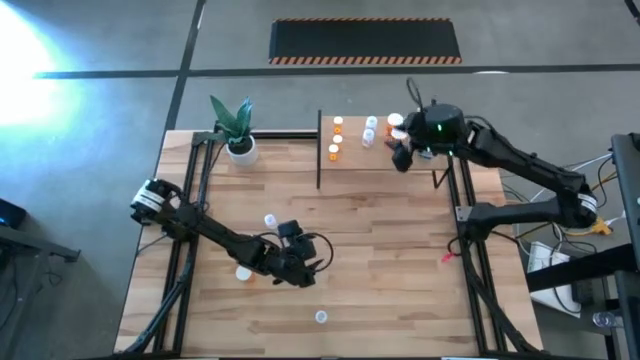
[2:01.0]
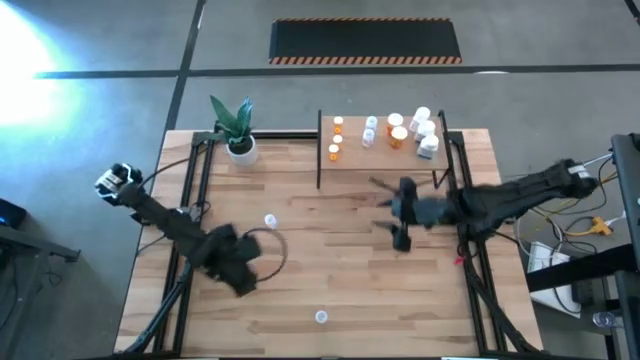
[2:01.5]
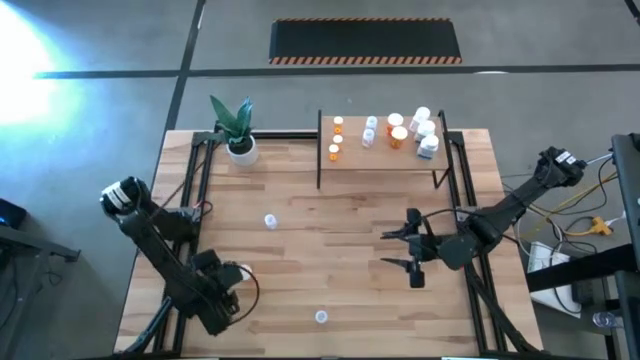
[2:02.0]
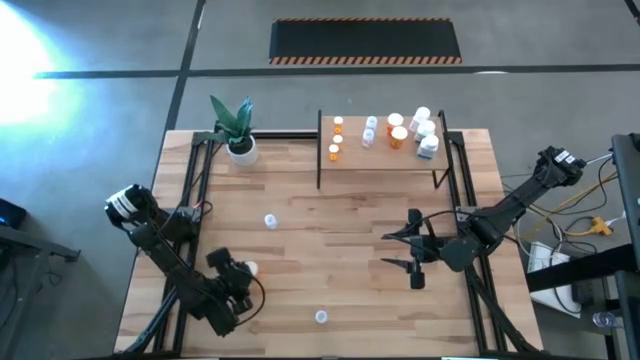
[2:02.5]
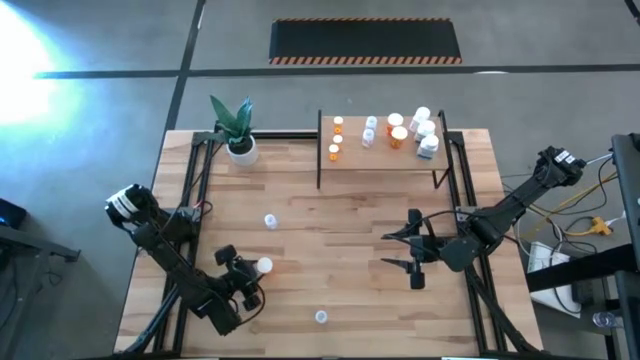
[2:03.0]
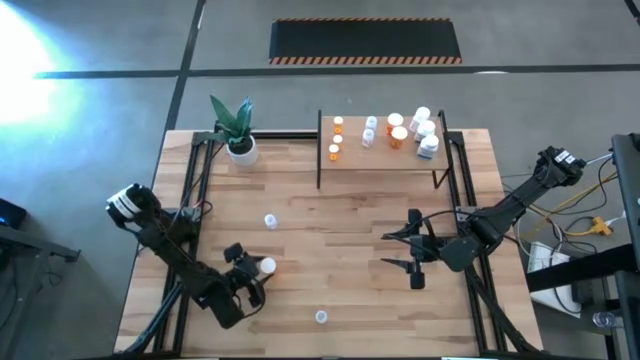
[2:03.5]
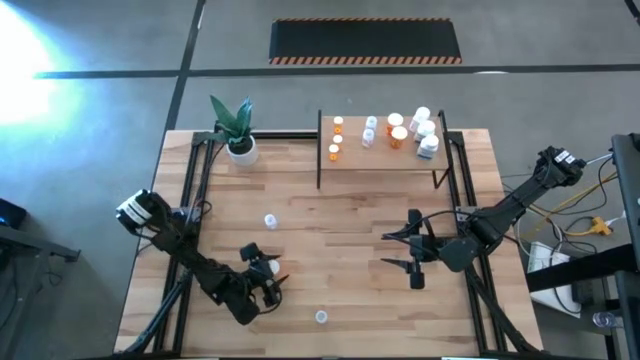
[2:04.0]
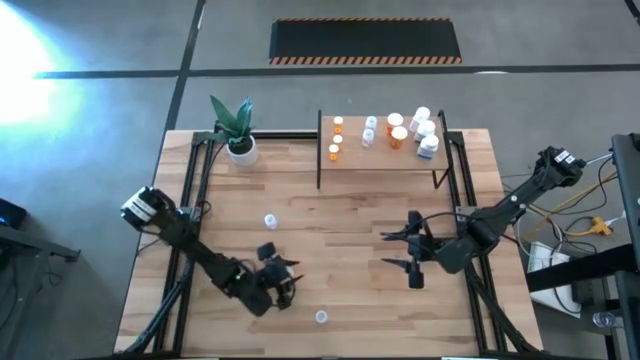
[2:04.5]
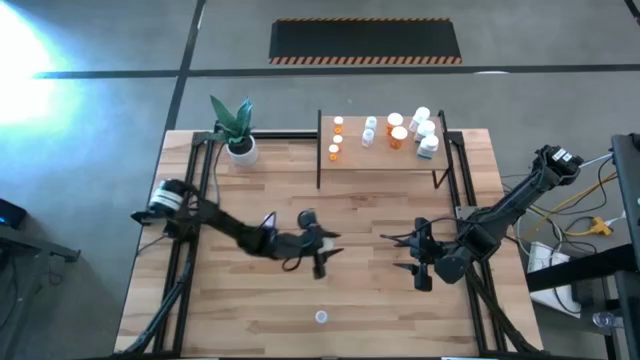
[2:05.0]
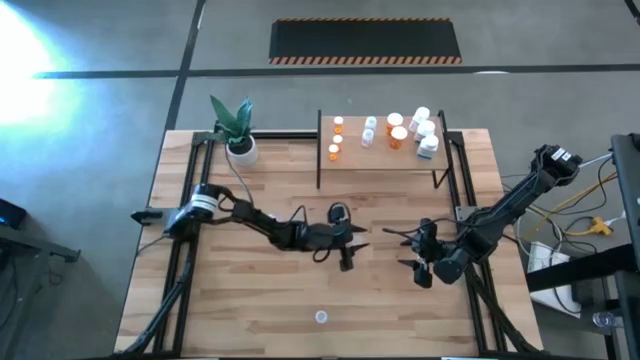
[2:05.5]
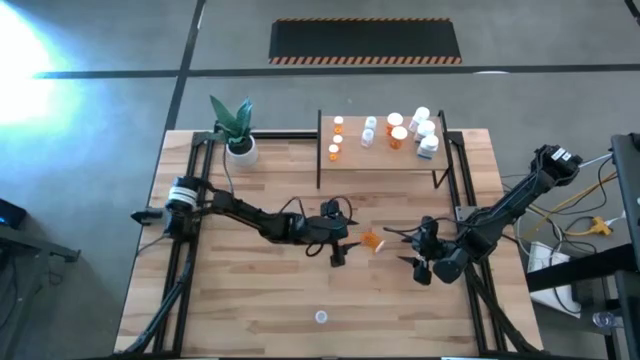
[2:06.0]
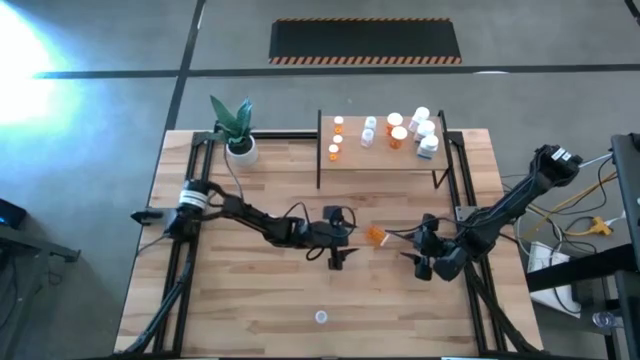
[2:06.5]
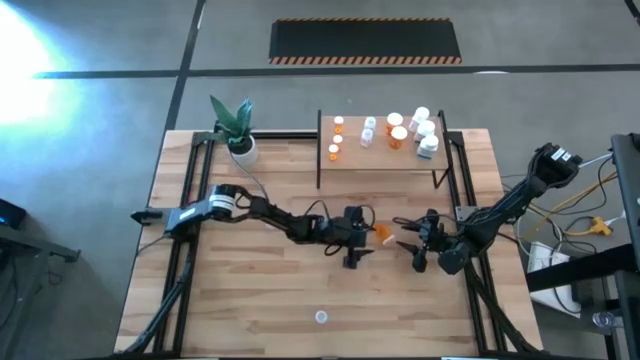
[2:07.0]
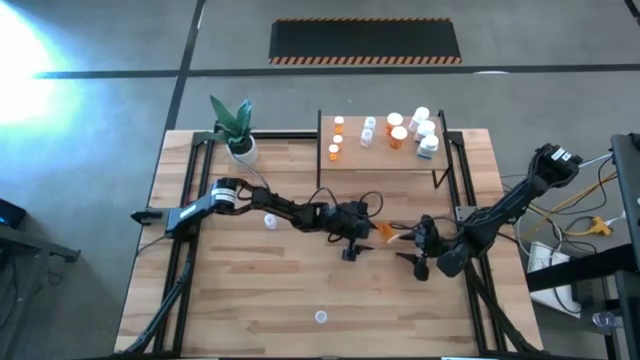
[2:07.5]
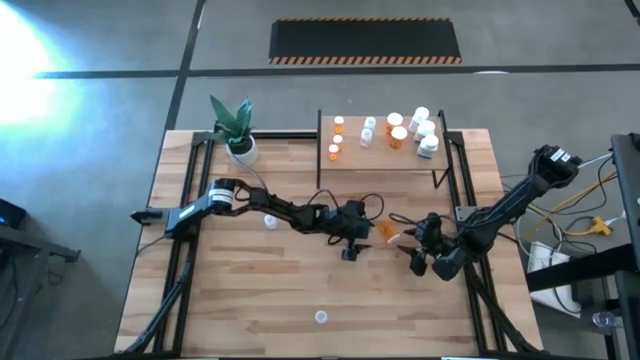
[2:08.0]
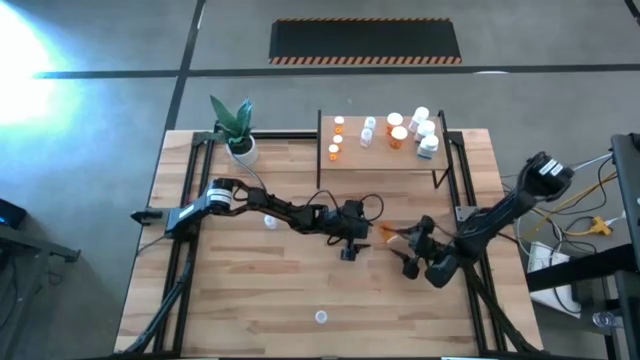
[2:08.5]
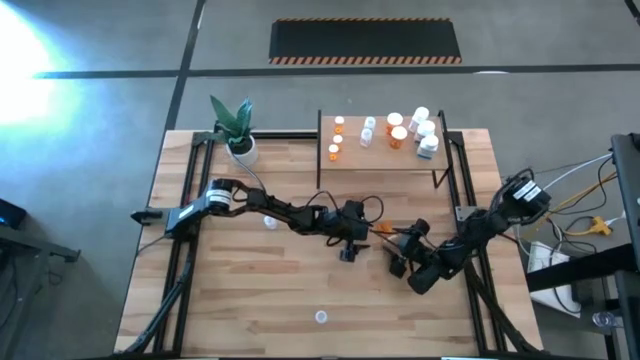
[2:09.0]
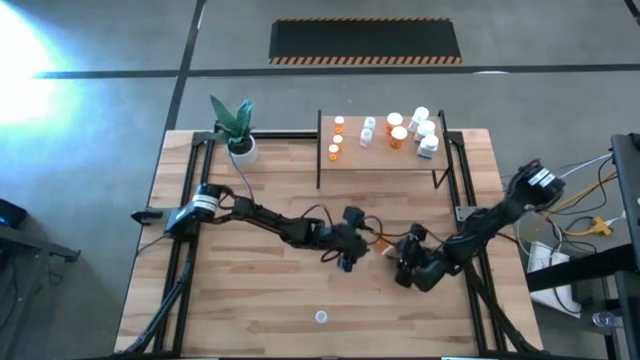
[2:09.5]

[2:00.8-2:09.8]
Task: Pick and place medicine bottles onto shelf by color
Put the big orange pill bottle on the shelf aligned with the other big orange pill bottles

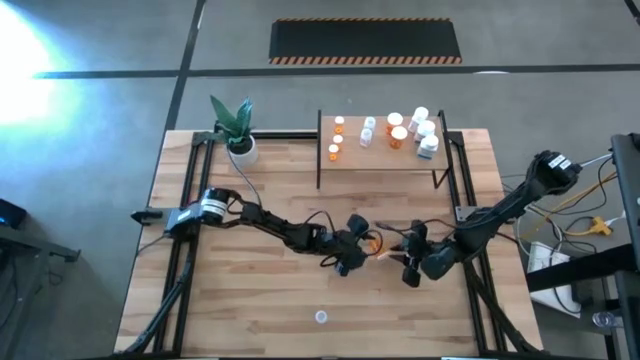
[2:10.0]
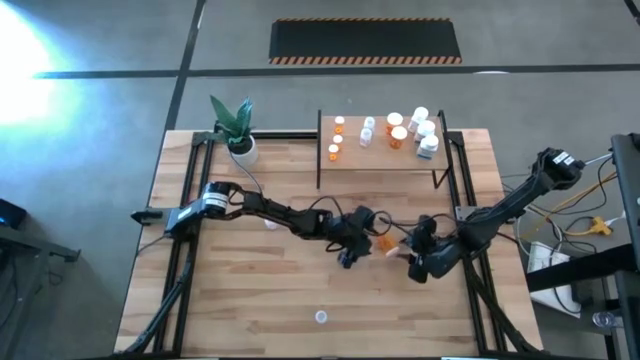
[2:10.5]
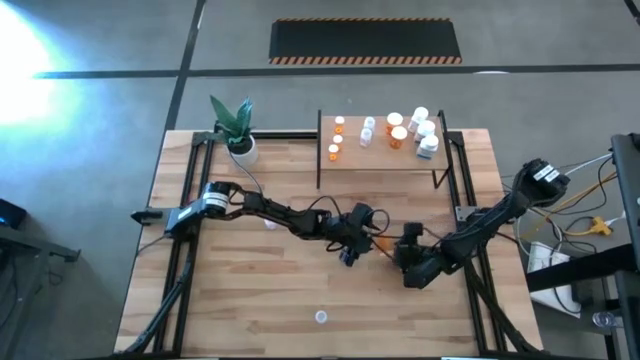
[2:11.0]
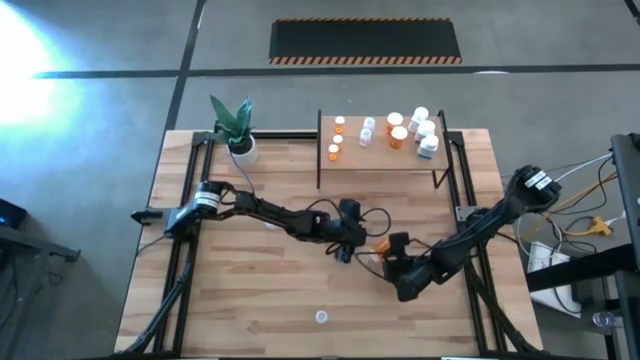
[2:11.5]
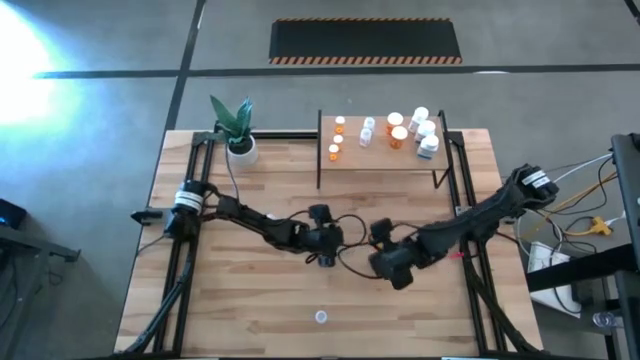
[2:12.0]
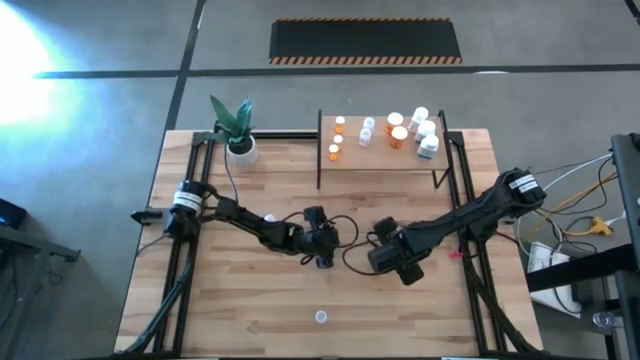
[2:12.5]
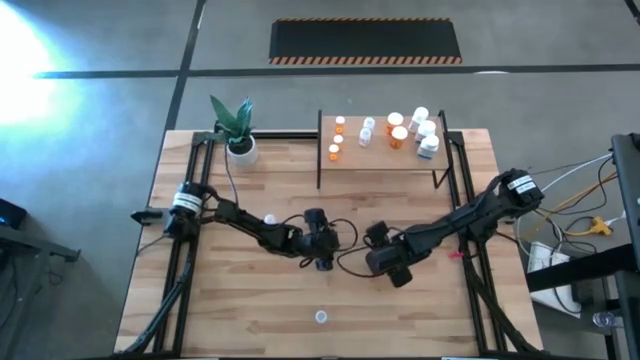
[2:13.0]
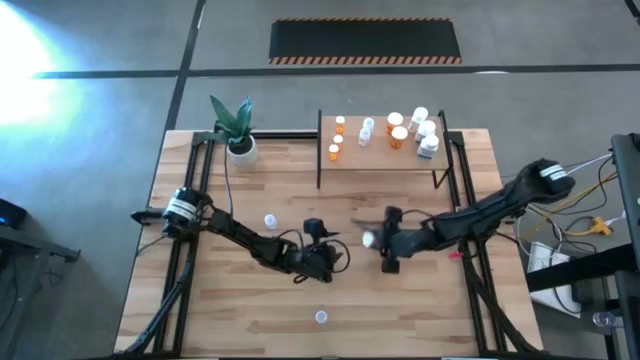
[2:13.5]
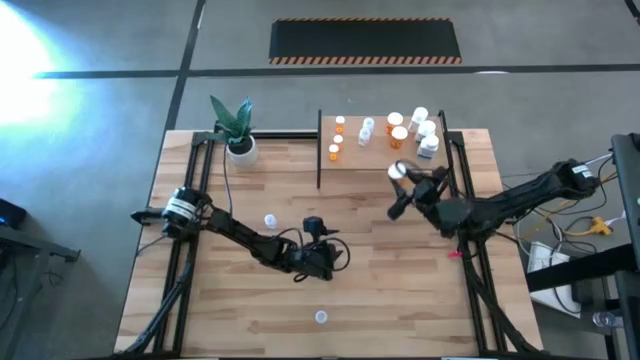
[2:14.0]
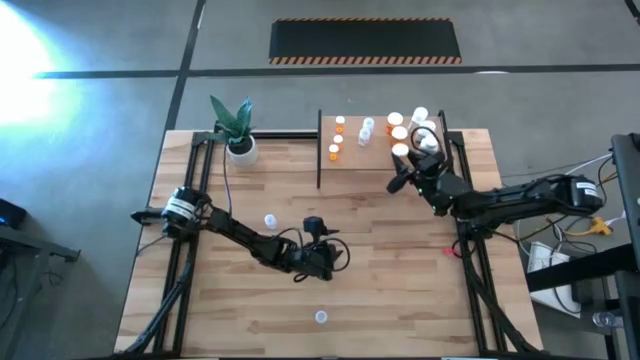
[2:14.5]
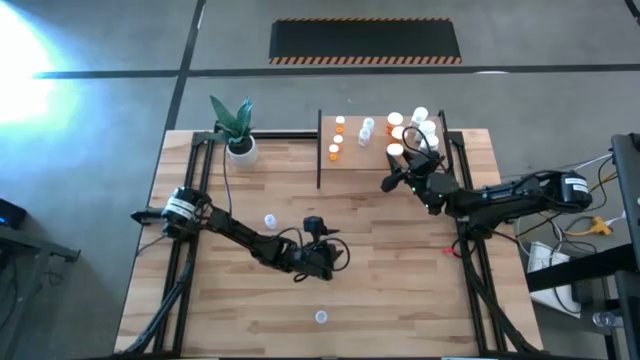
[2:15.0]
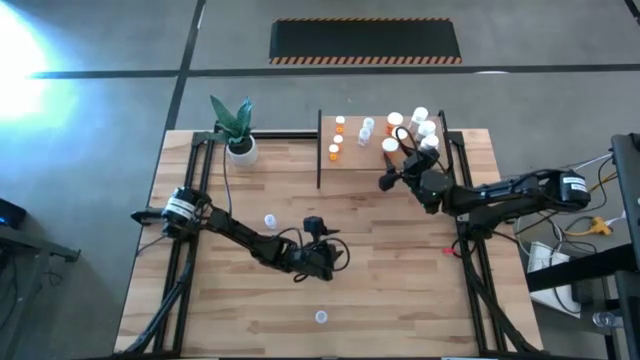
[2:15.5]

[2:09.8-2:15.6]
Put the big orange pill bottle on the shelf aligned with the other big orange pill bottles

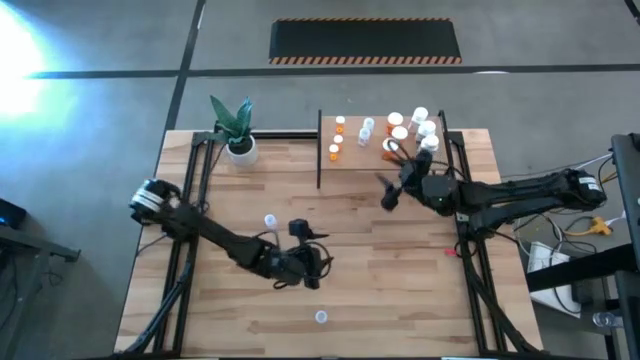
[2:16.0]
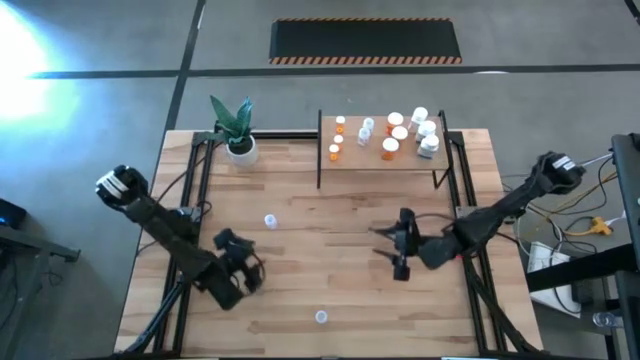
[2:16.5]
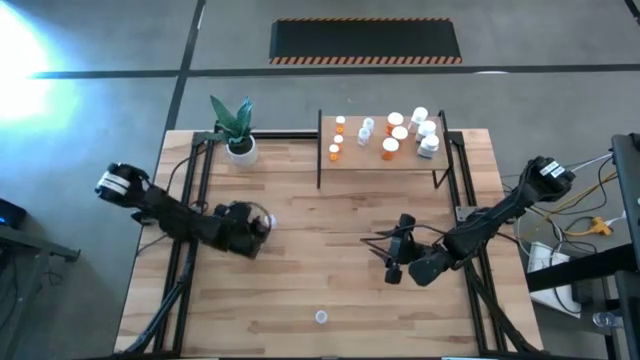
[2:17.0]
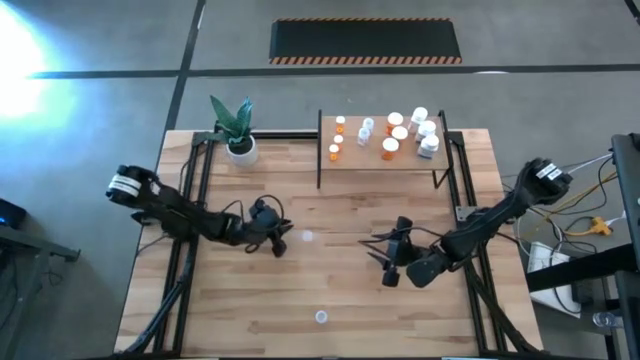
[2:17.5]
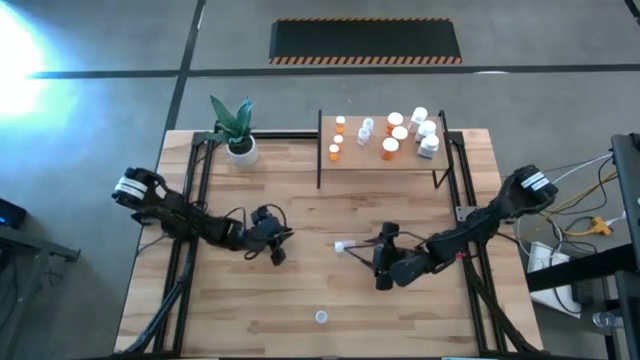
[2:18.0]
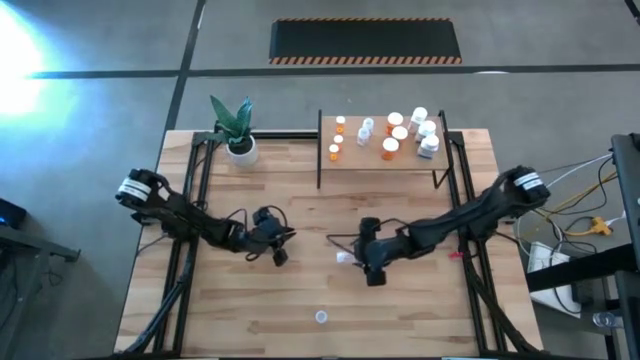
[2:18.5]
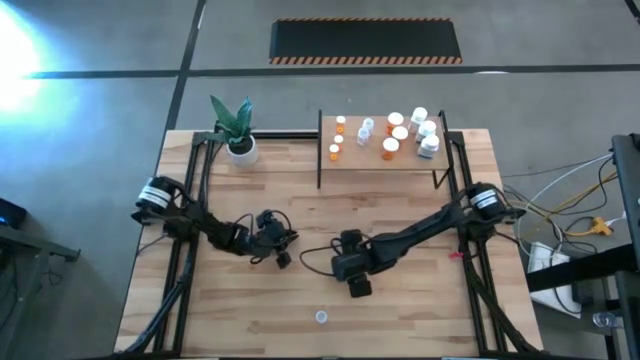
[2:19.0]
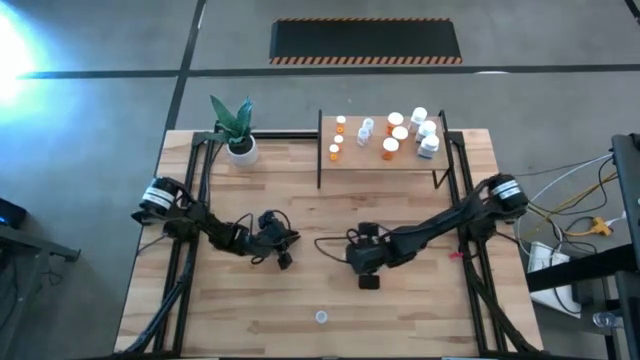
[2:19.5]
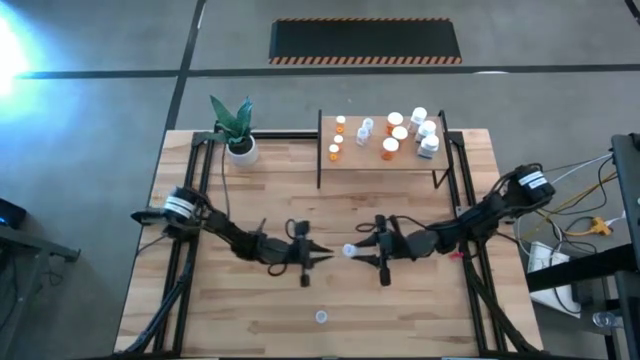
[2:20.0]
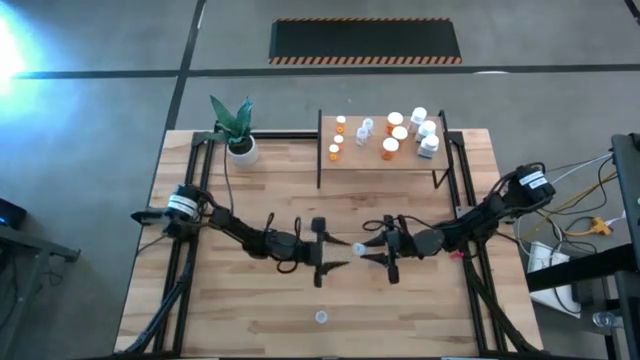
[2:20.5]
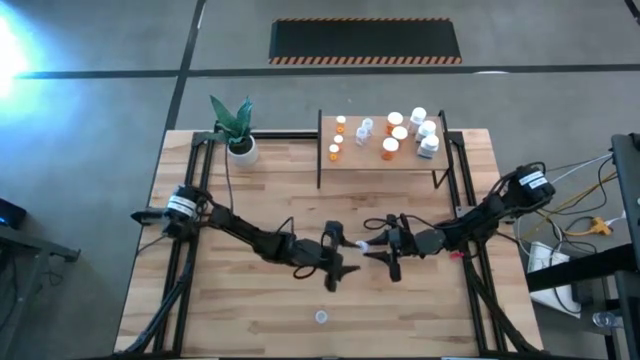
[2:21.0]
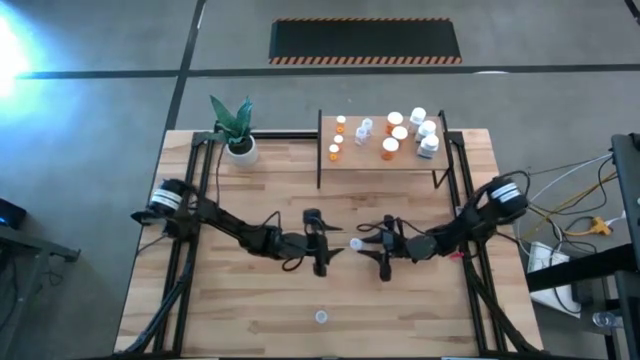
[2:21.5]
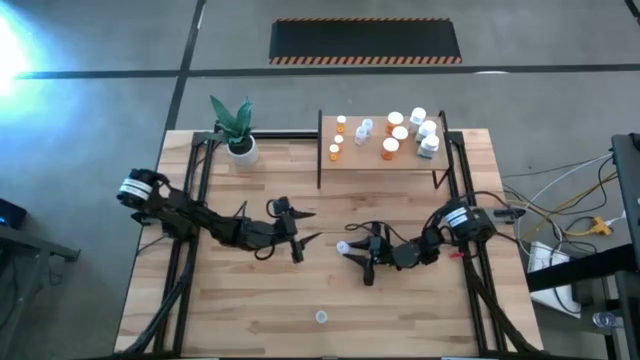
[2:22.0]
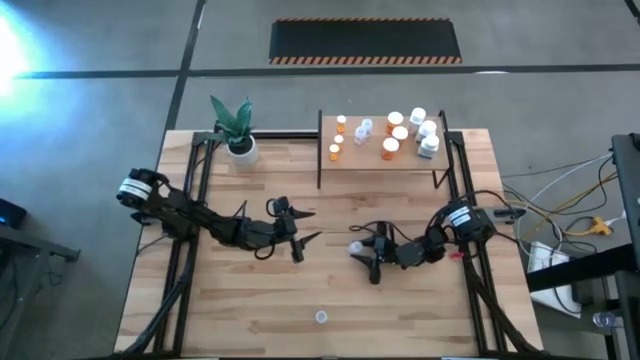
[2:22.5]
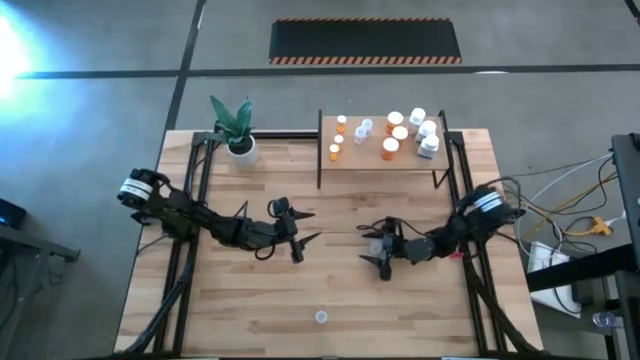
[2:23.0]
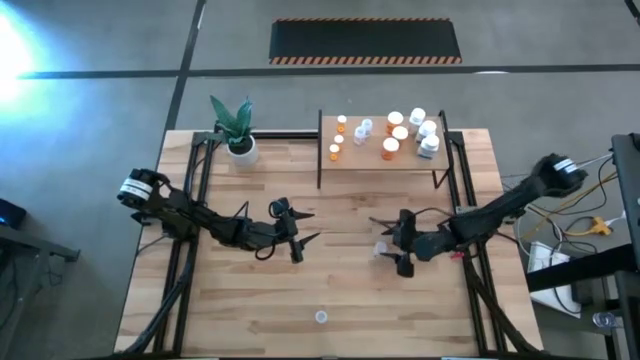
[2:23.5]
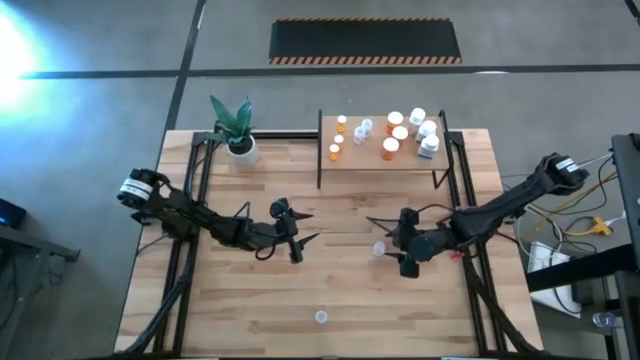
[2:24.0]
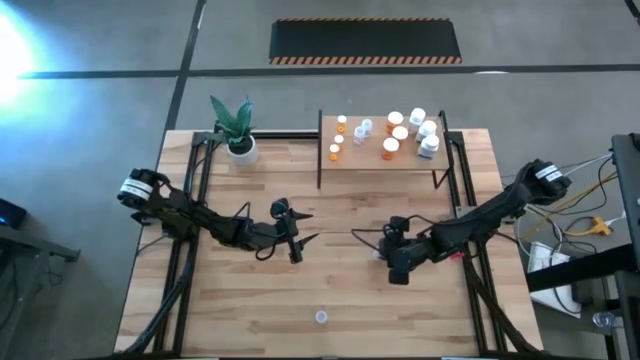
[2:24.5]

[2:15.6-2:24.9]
Put the transparent pill bottle on the shelf aligned with the other transparent pill bottles
